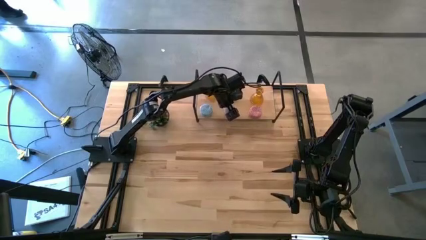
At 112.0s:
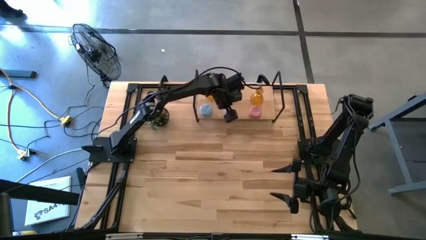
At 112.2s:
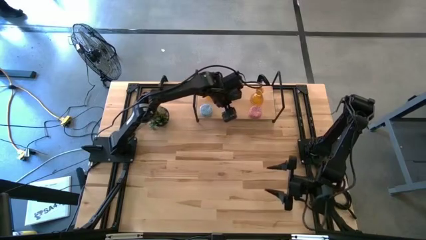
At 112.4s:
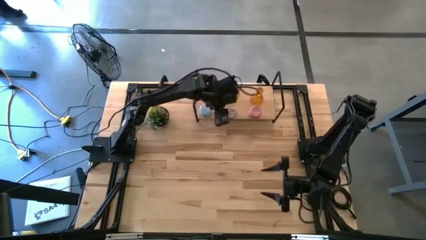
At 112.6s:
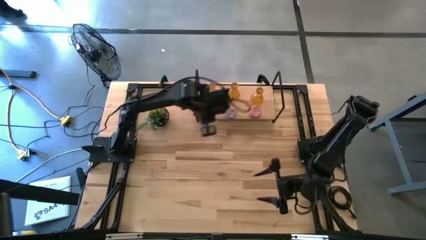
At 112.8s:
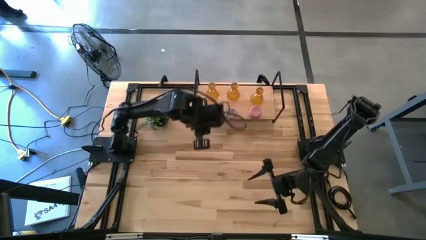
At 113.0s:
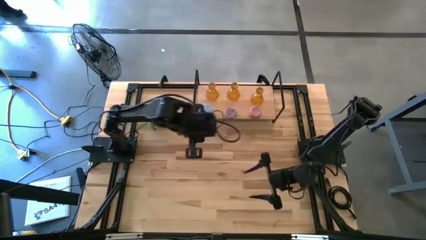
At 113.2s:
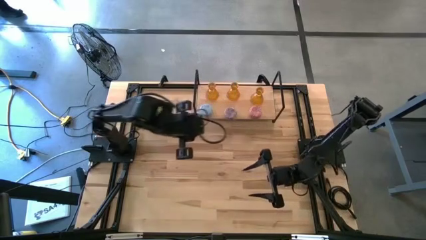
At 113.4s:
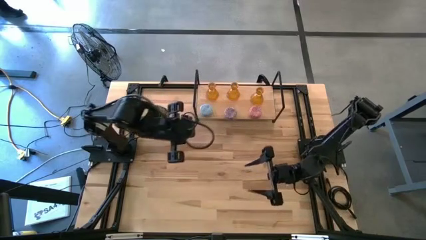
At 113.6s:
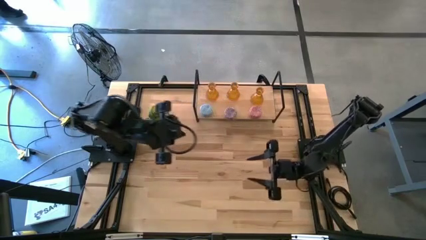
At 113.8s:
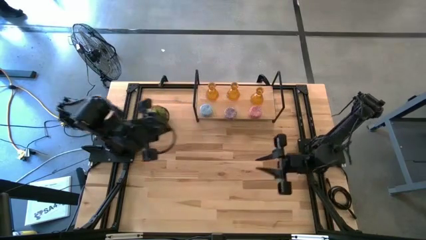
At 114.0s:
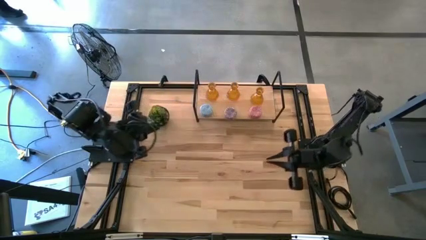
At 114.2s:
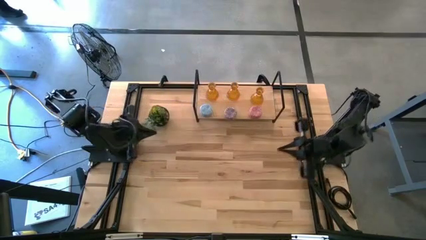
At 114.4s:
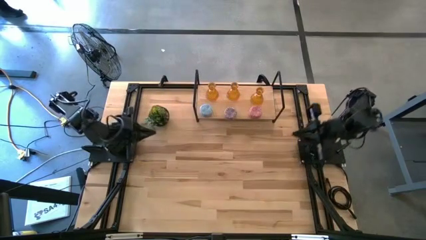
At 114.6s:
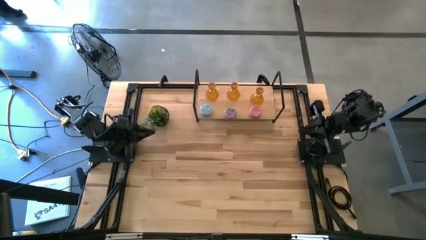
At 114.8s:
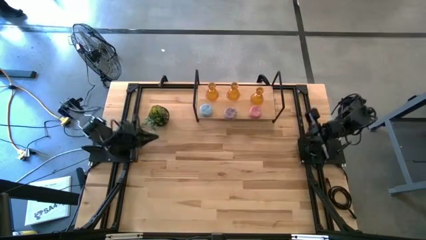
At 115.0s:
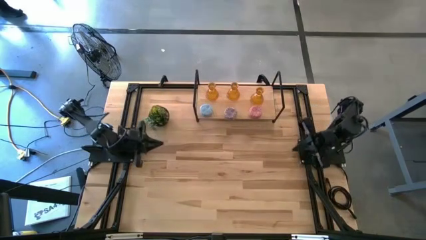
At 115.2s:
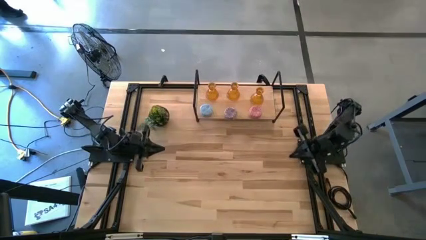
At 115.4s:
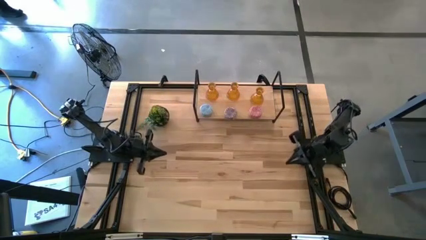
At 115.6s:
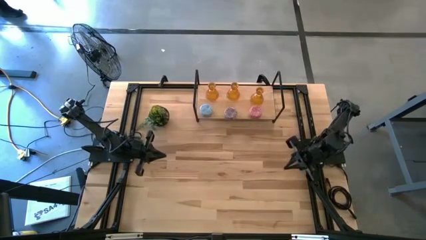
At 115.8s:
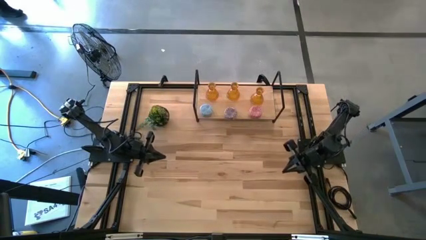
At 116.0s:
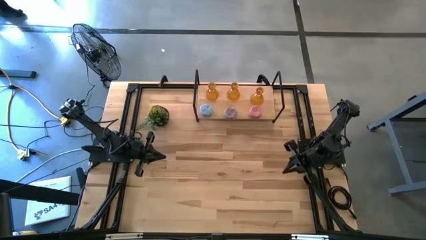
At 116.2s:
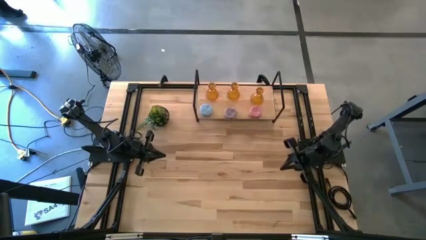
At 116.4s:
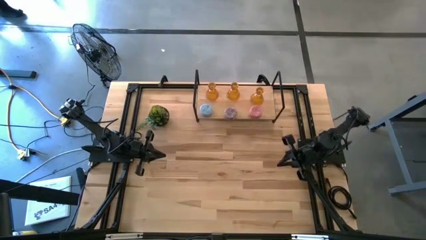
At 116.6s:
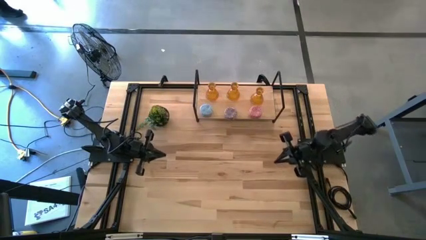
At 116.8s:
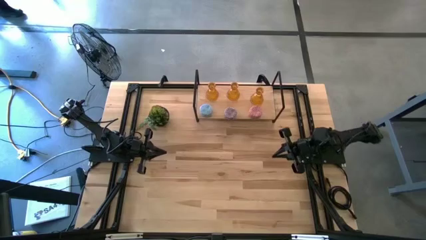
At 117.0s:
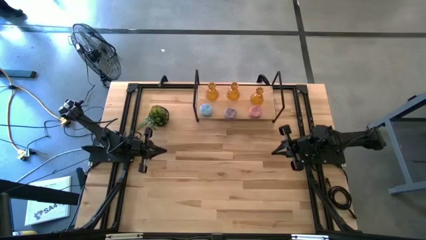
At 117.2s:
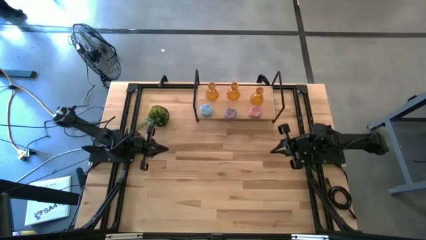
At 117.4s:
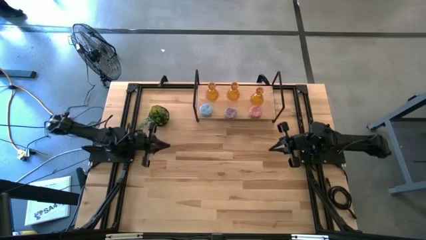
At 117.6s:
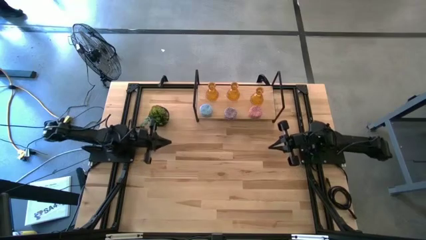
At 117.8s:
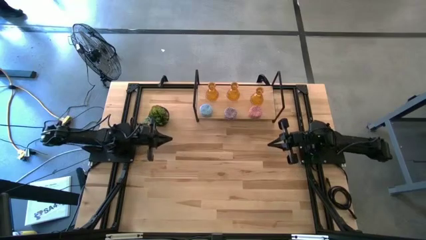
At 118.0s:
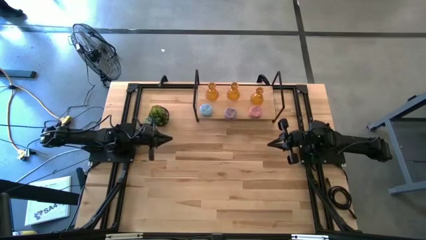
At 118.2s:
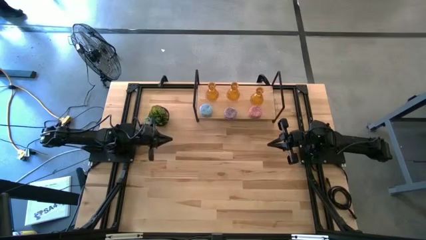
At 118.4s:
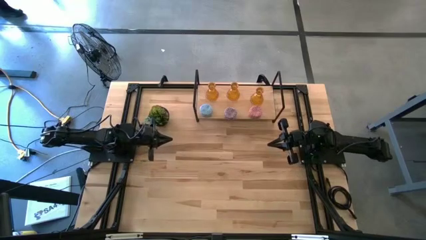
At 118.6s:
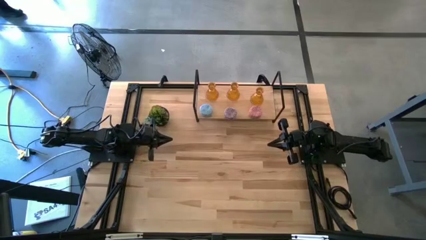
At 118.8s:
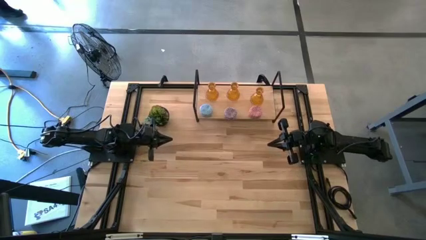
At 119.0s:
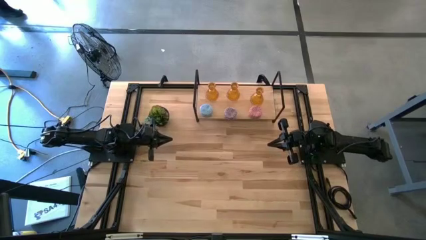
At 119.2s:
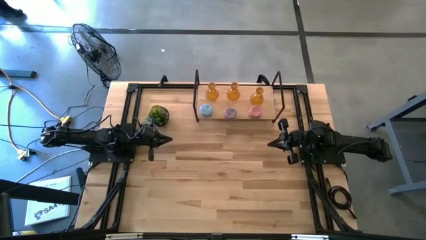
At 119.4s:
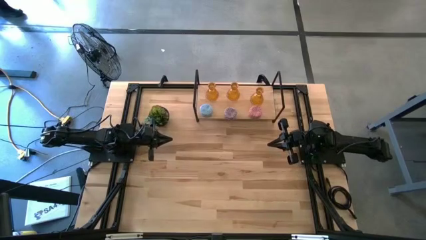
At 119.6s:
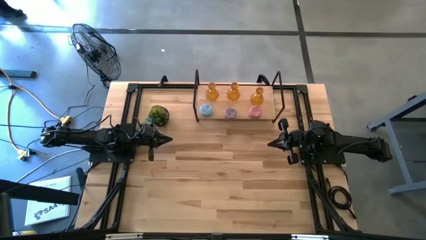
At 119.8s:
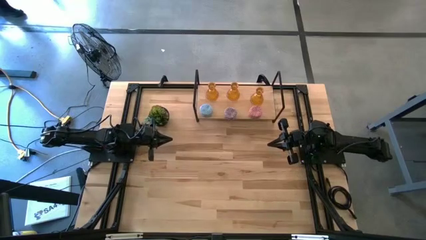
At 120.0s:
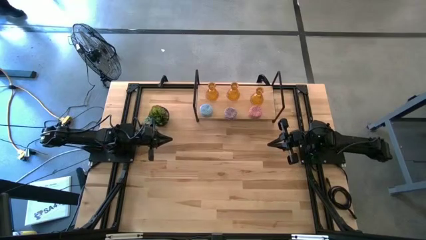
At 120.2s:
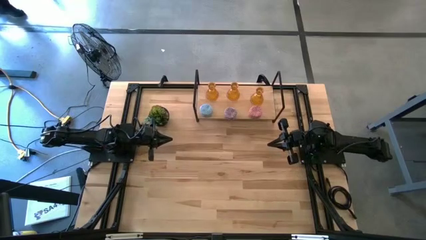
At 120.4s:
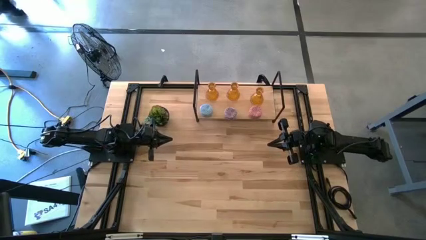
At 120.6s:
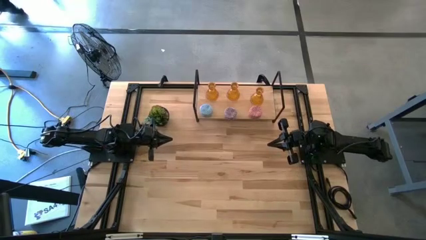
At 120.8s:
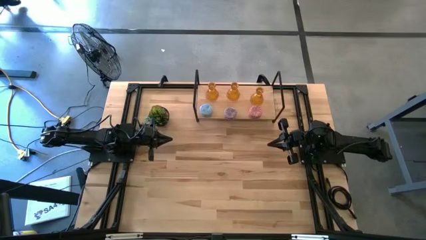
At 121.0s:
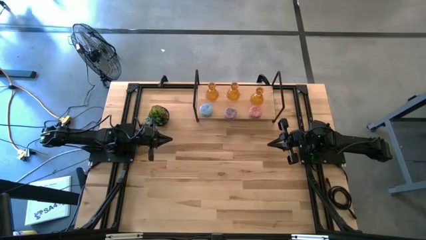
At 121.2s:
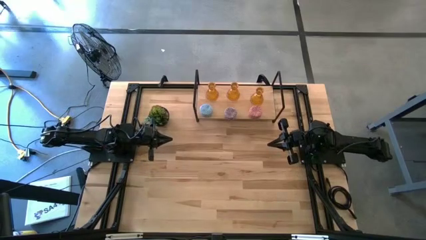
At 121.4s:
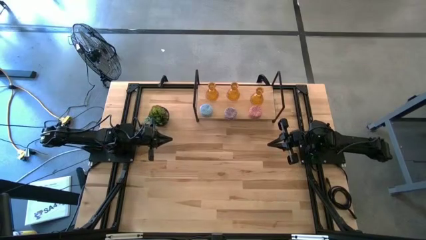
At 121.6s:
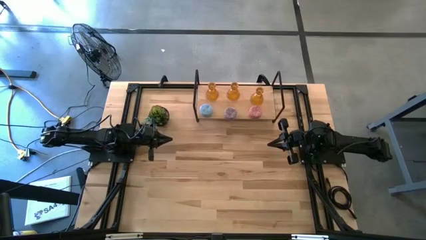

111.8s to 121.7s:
Task: Pick & Place candle stick holders
Return to Home Position

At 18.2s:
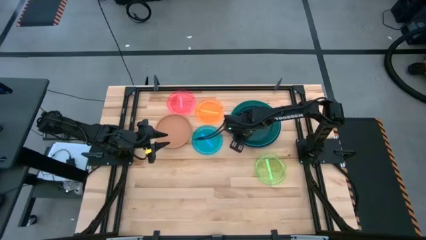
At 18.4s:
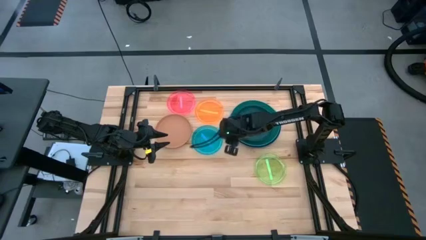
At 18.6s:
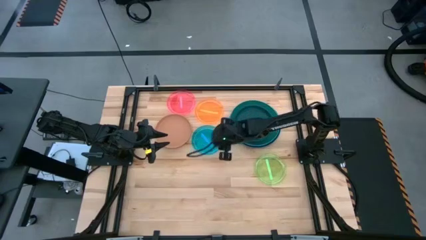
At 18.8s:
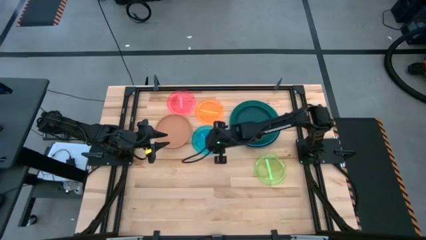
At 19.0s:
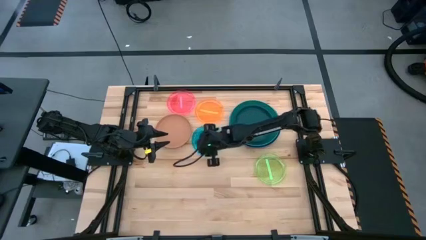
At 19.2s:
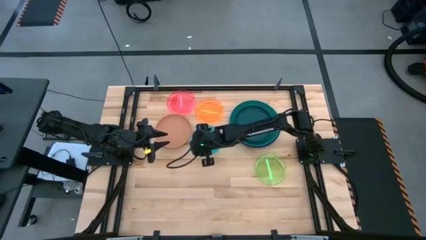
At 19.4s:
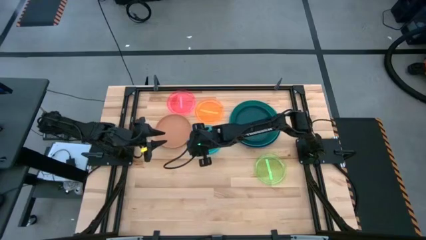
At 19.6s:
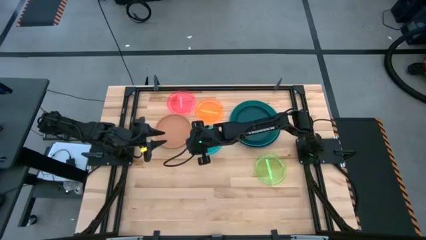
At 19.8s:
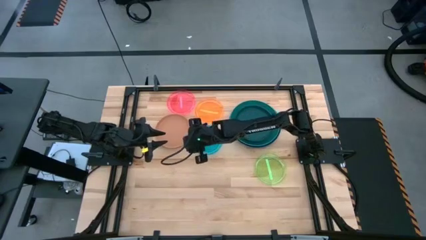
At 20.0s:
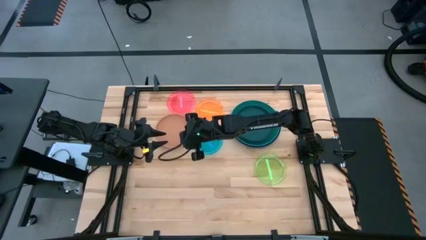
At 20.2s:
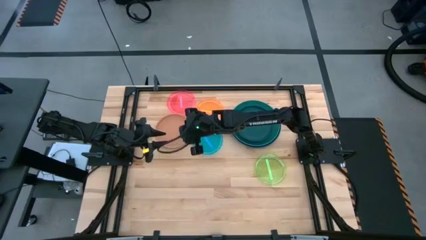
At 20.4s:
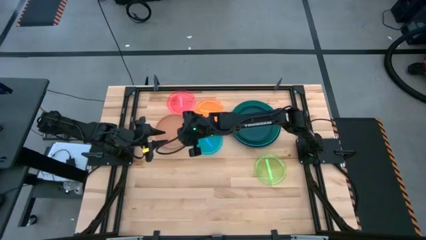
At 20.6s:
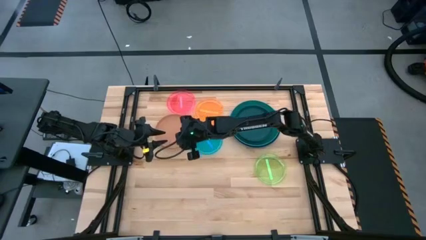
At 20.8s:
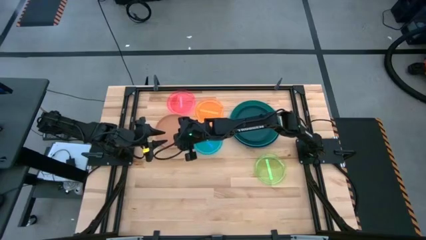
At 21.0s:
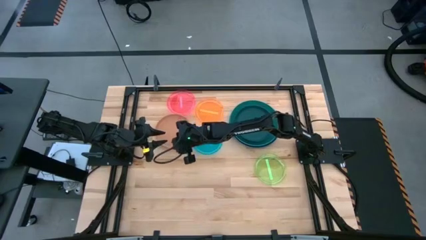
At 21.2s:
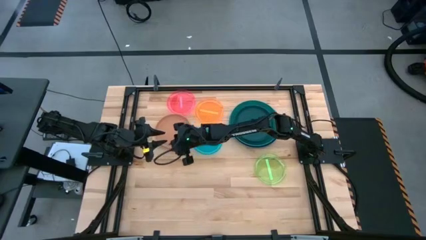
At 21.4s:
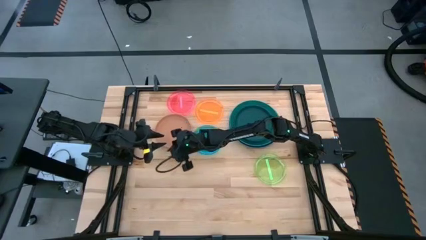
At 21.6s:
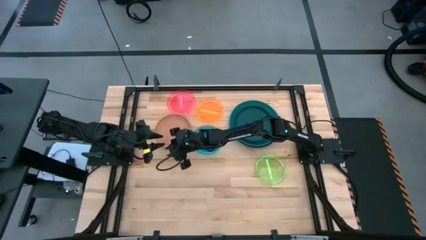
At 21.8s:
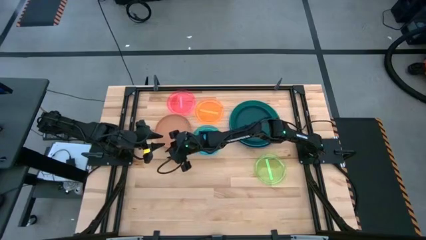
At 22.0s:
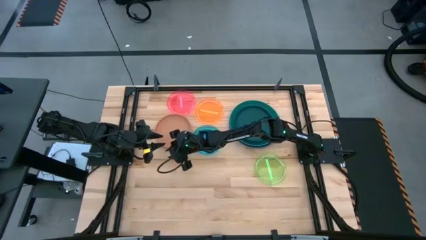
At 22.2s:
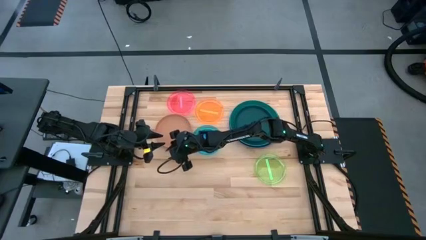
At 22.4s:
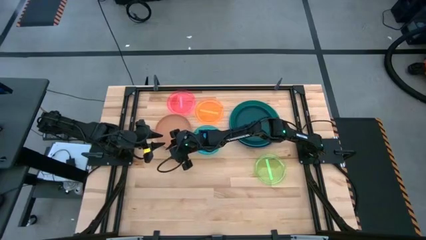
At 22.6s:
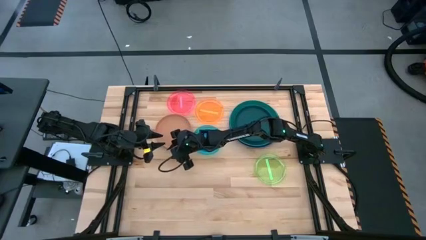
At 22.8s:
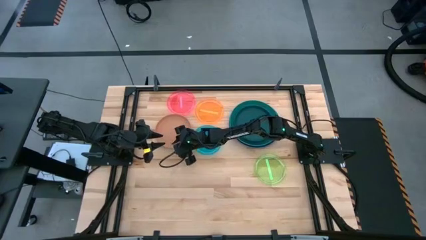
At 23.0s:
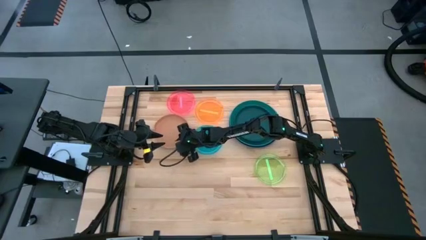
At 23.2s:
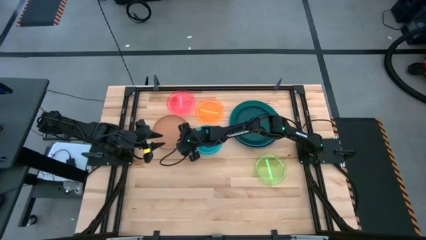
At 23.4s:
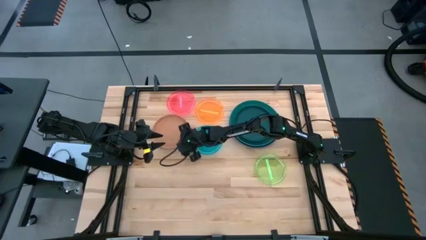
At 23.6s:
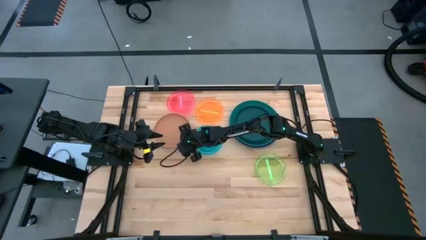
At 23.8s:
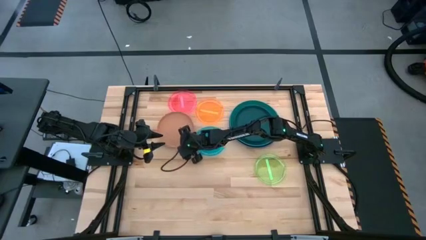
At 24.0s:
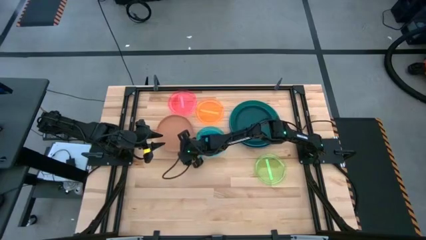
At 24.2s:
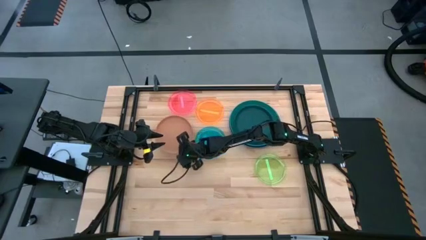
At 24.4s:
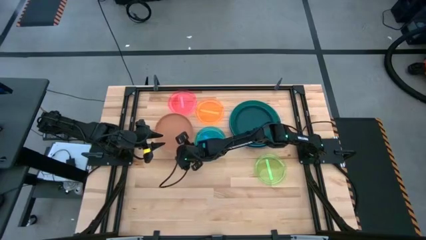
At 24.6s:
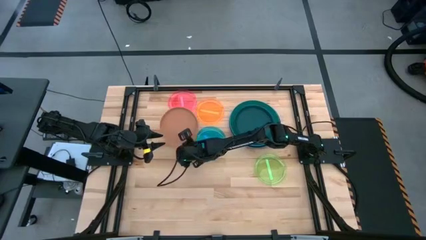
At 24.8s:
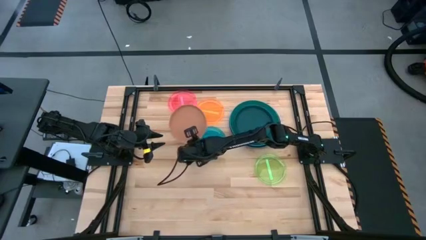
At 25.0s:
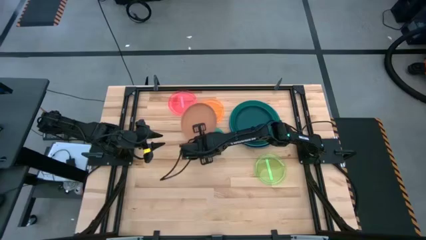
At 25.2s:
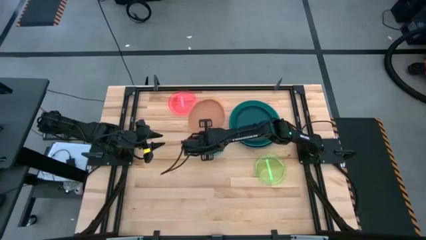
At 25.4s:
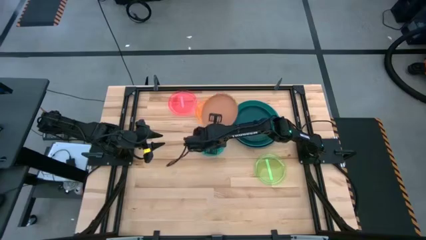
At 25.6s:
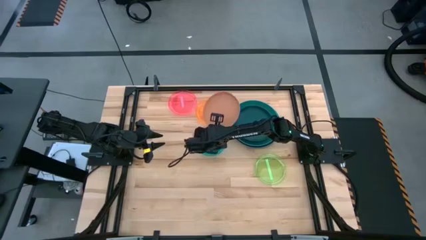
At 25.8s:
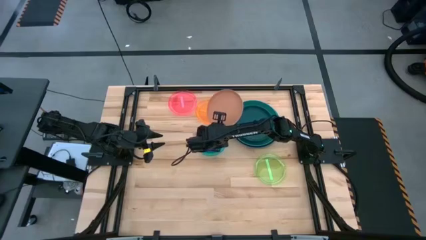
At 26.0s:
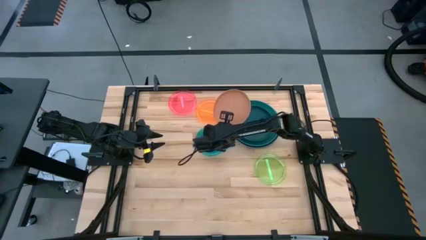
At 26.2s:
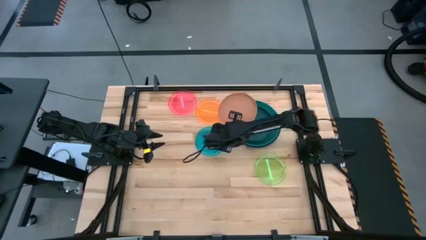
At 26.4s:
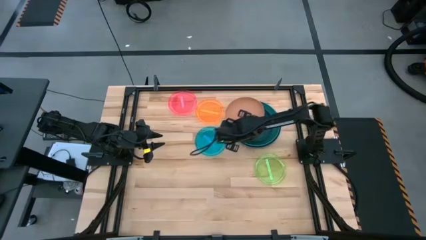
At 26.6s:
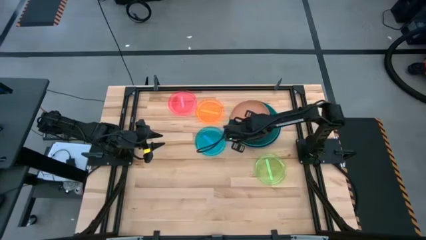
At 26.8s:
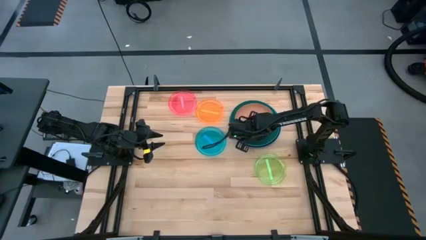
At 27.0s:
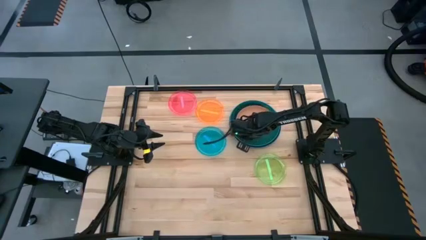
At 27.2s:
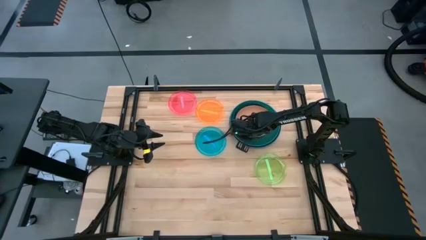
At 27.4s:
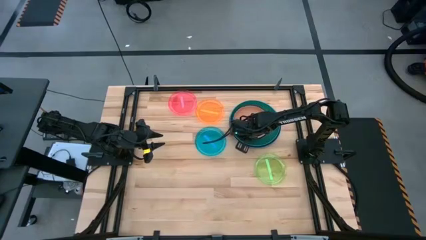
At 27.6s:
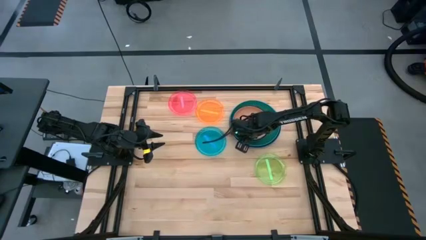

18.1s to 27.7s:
Task: Stack plastic plates
Stack the brown plate on the dark blue plate
